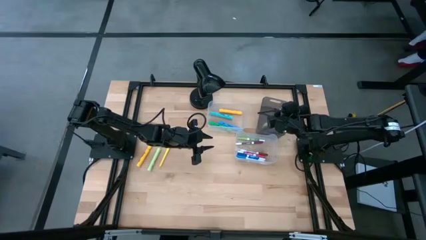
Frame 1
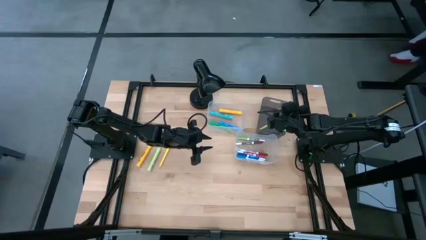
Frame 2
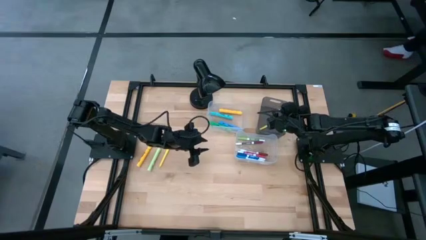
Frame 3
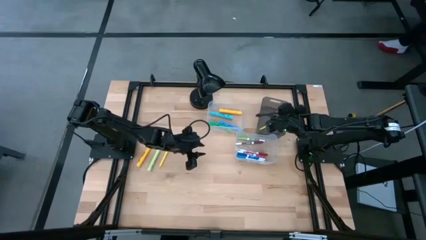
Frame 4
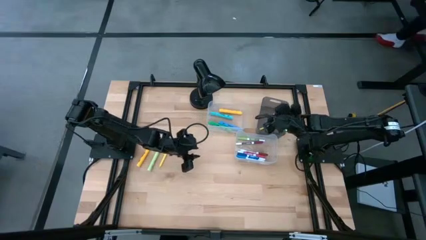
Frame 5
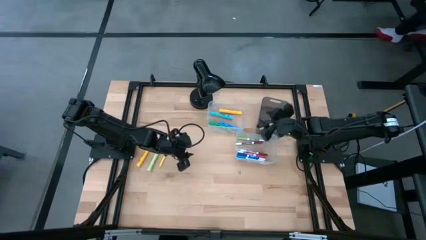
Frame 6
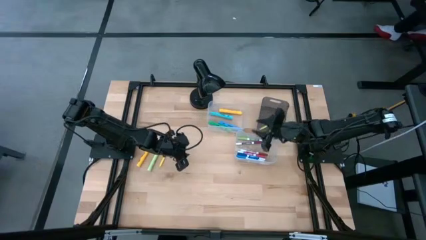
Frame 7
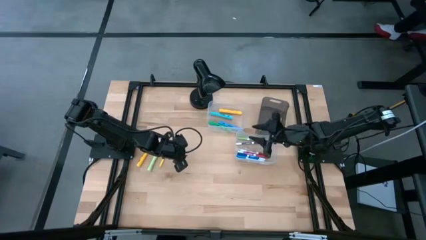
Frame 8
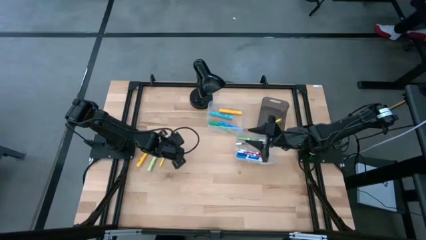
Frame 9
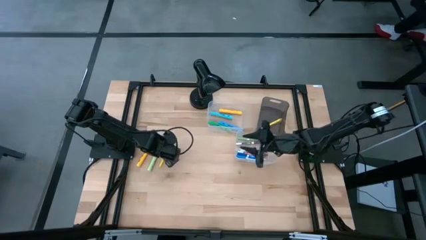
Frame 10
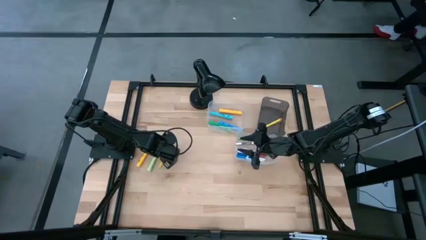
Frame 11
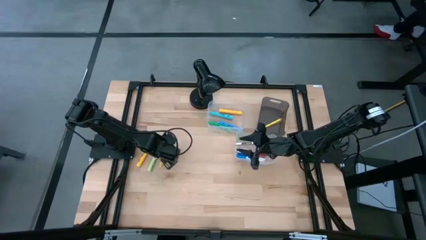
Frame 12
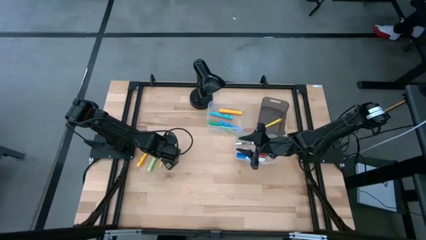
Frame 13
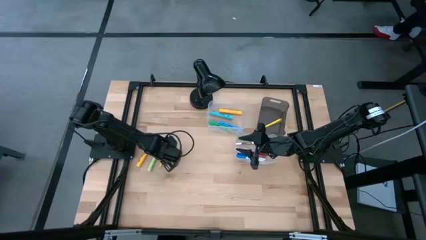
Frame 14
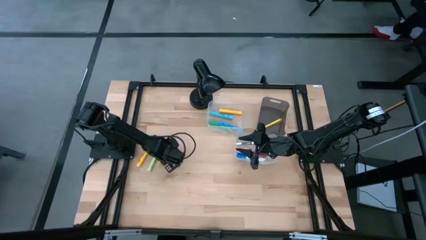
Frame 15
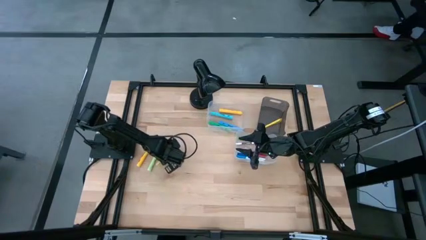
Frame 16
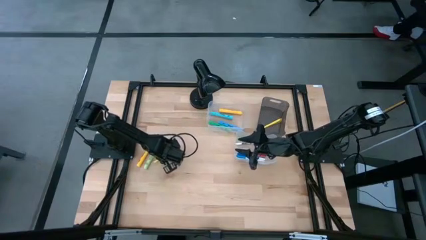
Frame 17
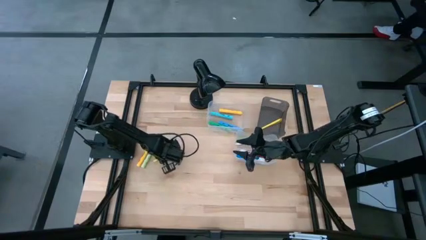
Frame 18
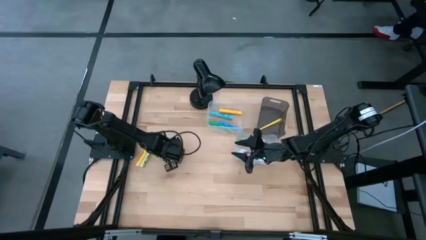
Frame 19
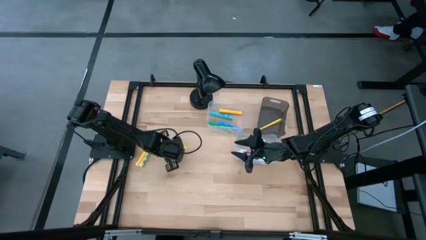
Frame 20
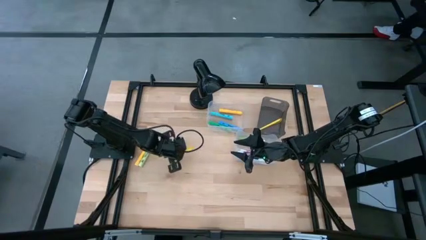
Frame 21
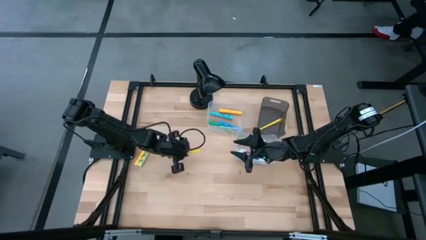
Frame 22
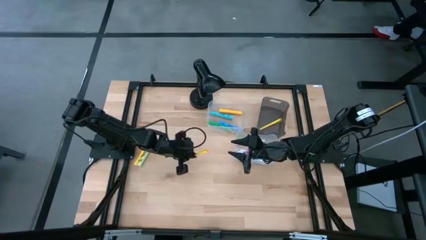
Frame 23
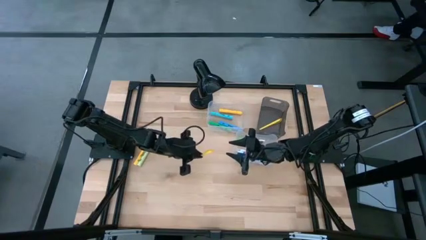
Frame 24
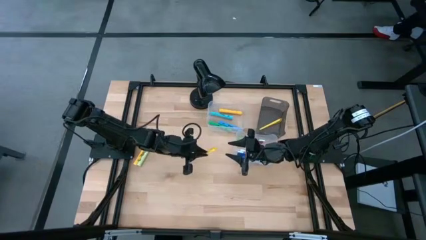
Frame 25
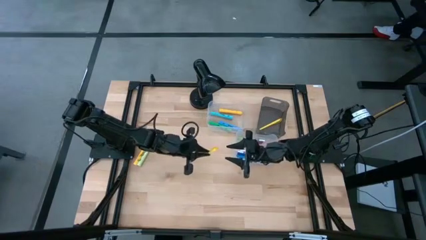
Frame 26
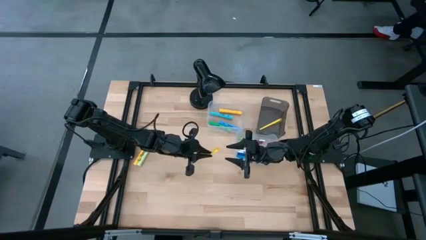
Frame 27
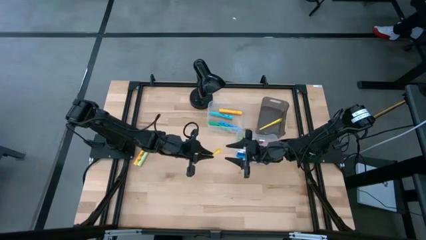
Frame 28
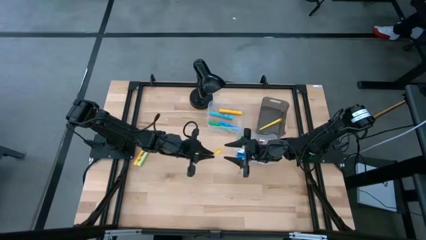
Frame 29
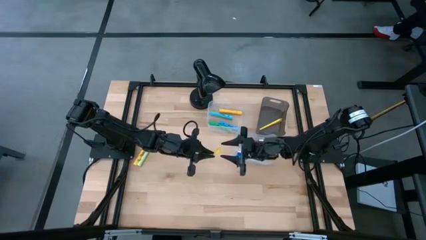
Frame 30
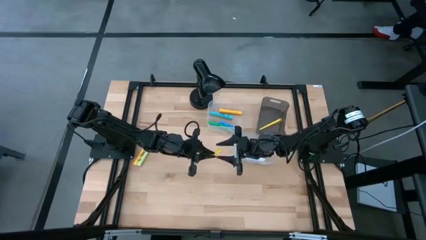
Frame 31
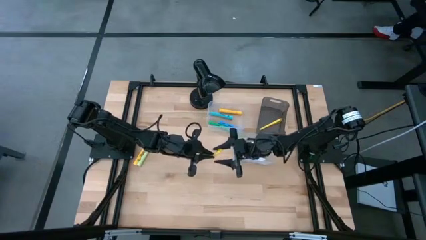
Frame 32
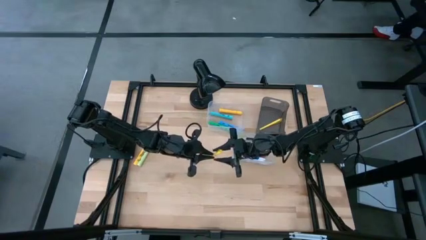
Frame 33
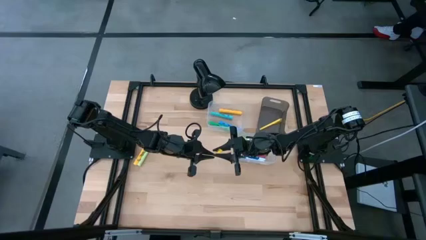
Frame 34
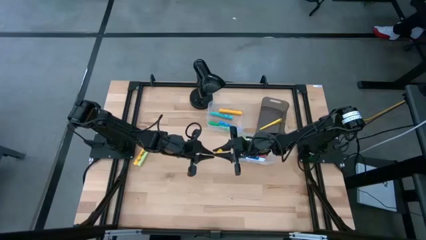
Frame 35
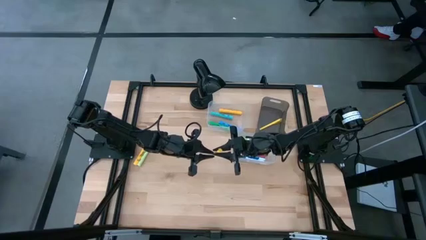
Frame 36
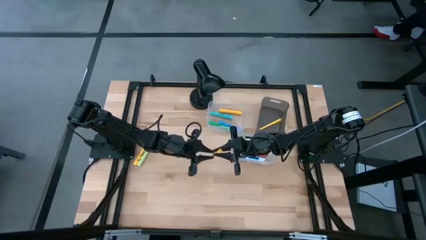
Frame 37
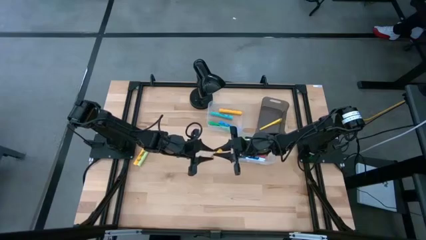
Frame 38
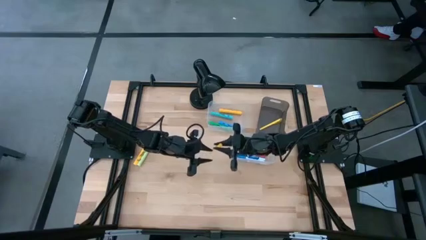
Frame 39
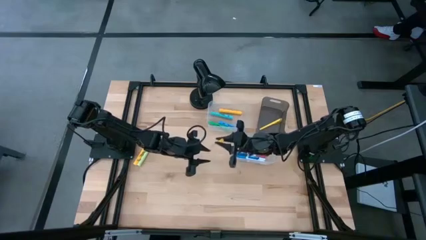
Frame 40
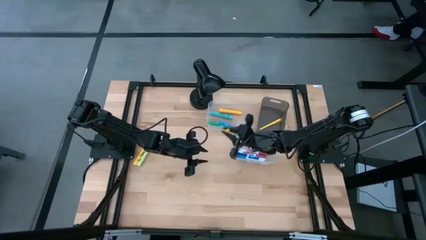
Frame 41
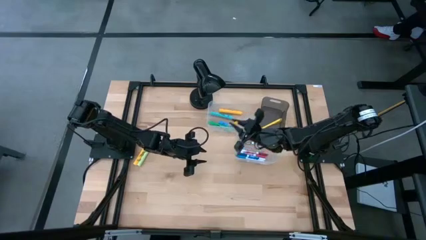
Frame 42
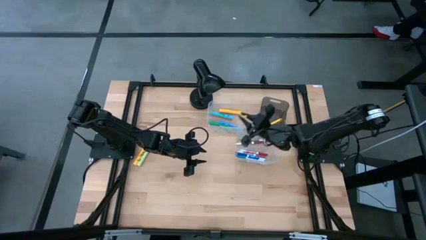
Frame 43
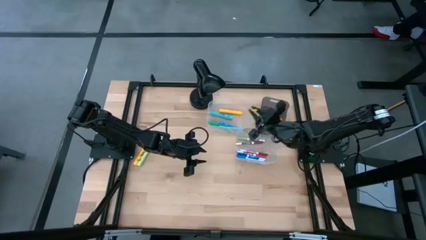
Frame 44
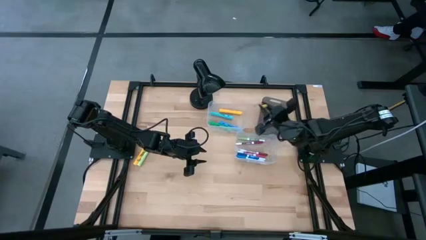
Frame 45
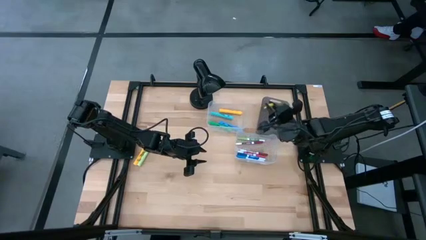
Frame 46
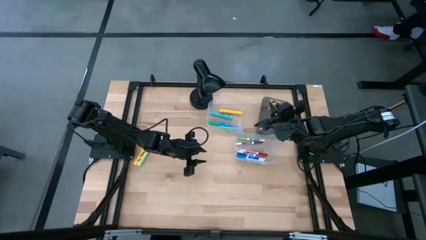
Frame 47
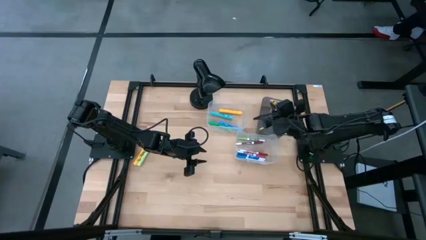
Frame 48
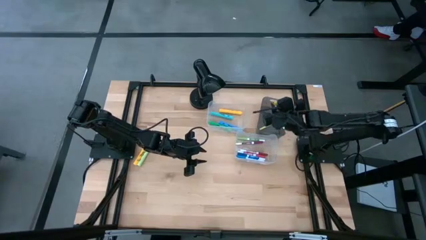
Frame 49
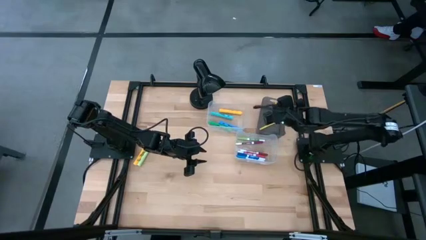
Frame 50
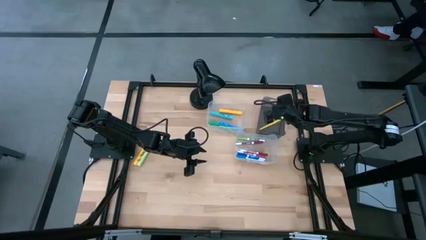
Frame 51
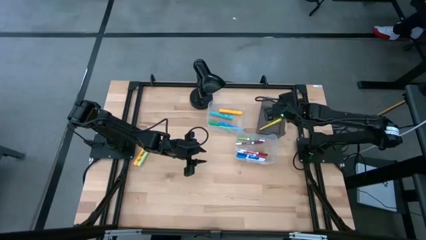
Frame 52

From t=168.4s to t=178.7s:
Task: Pick & Place Markers
Put the yellow pen into the black transparent bin

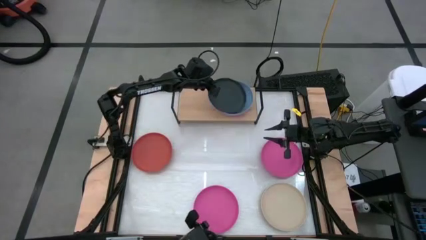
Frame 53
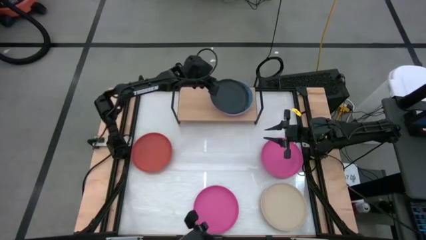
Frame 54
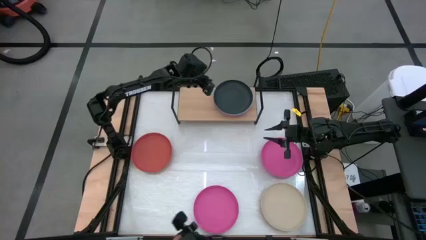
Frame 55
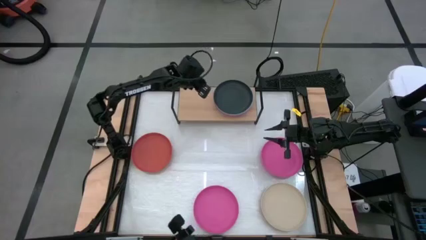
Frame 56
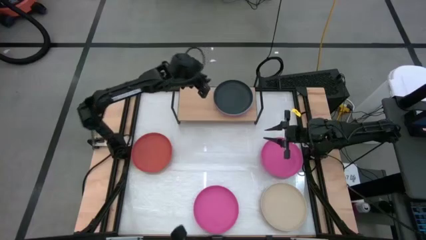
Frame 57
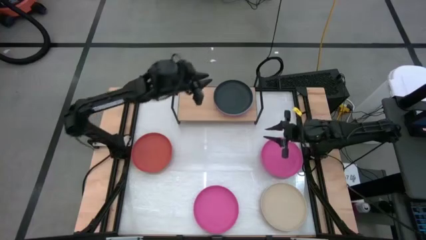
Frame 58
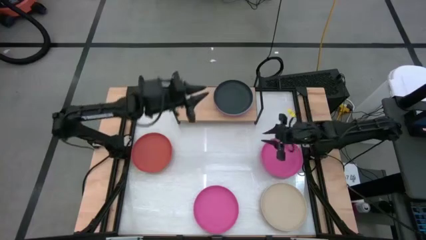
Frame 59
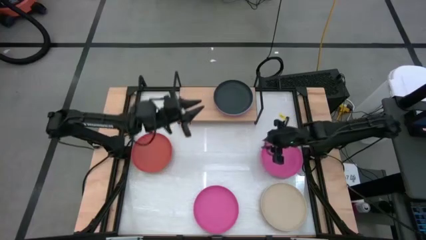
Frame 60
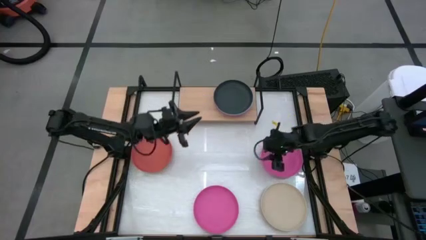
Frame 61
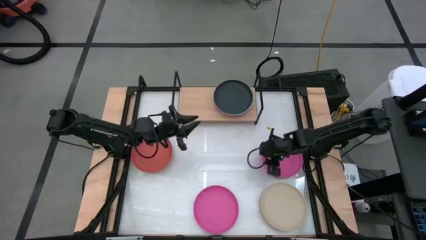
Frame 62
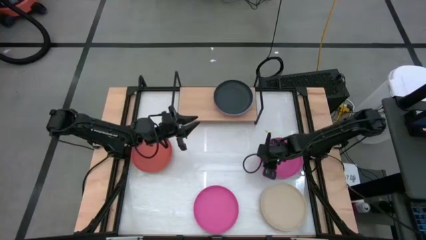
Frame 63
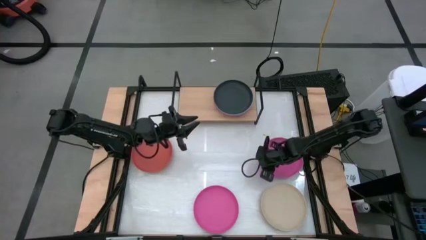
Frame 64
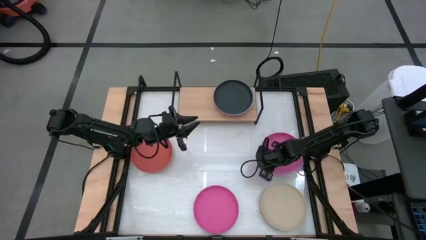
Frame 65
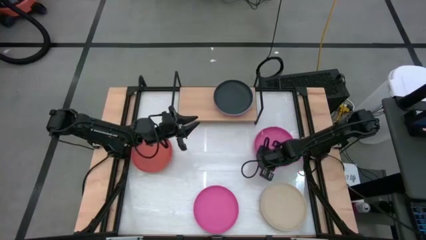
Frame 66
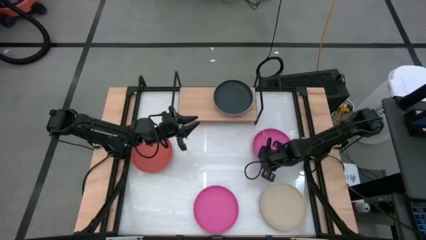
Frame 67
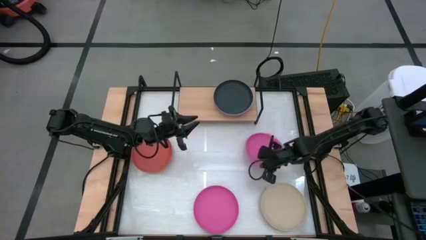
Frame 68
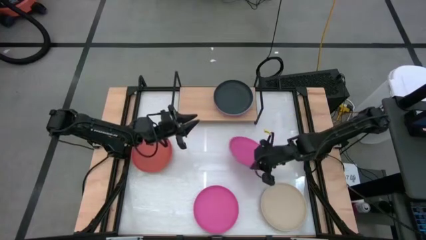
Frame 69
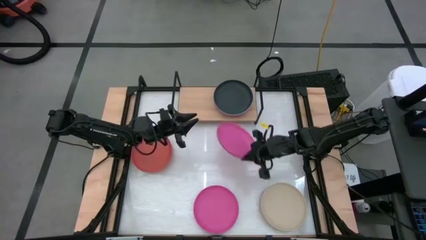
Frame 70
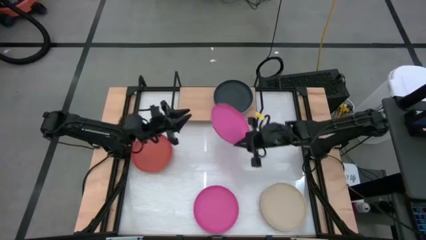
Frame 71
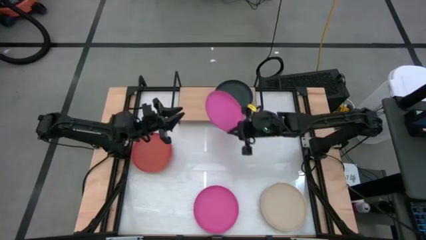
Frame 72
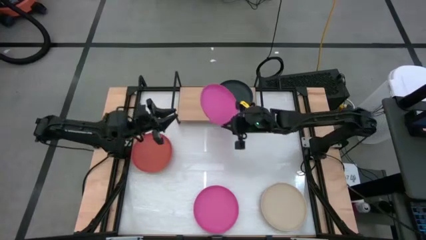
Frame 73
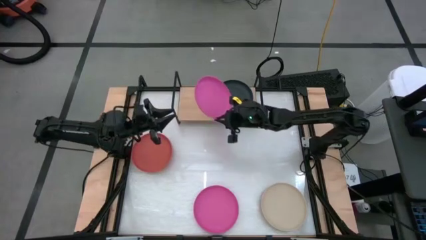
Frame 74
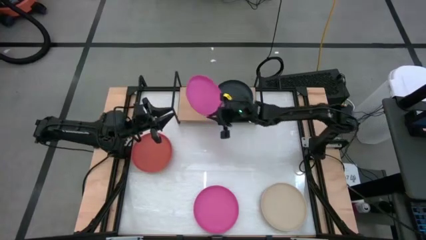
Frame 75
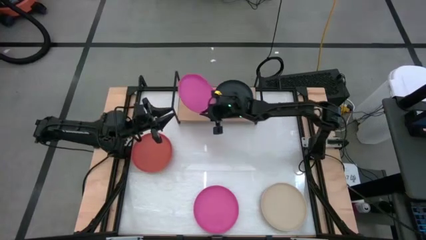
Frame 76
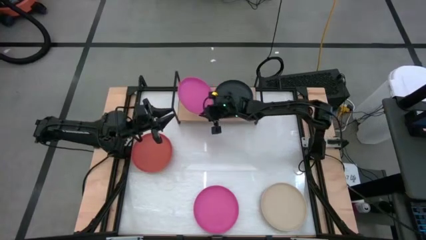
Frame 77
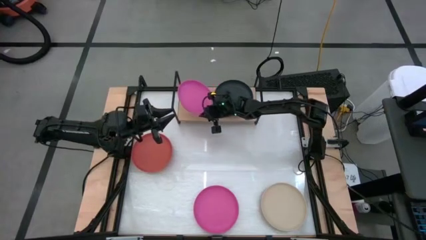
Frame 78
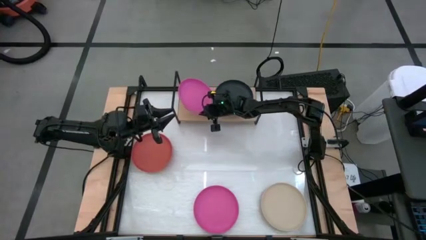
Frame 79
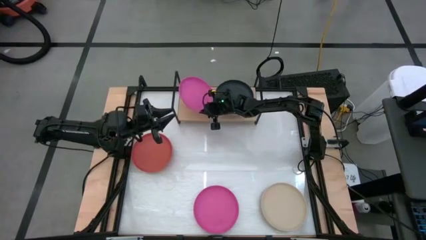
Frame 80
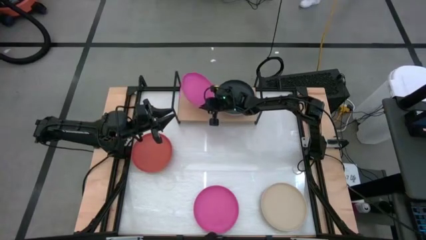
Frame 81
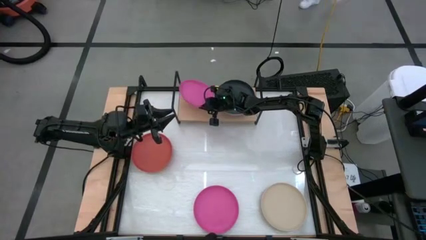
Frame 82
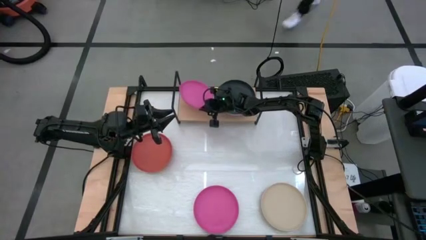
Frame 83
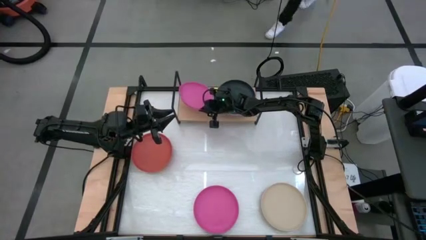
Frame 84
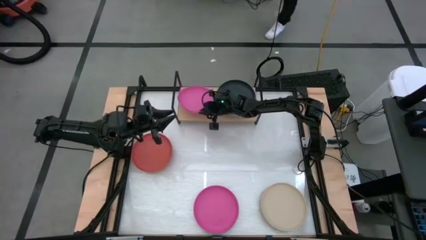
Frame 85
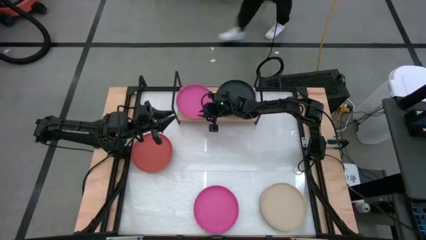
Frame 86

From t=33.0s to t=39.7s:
Task: Place and stack plates onto a shelf
Put the top pink plate on the shelf
